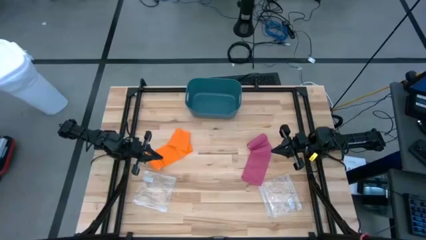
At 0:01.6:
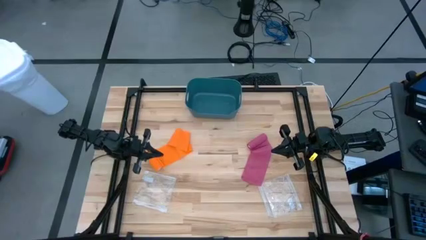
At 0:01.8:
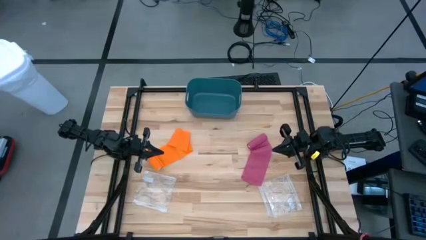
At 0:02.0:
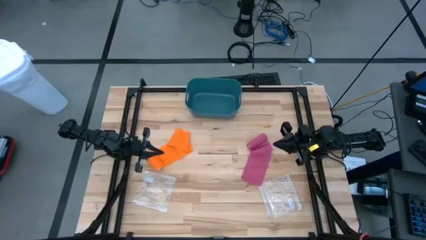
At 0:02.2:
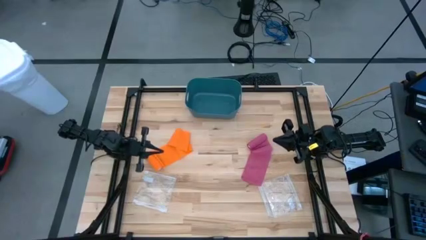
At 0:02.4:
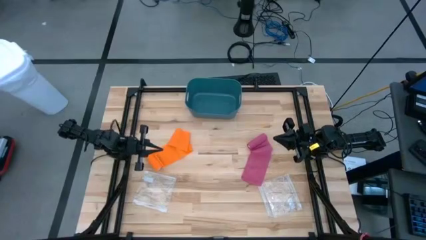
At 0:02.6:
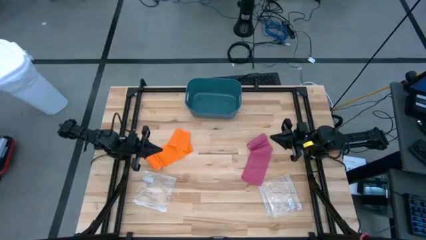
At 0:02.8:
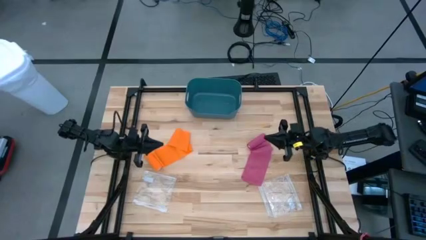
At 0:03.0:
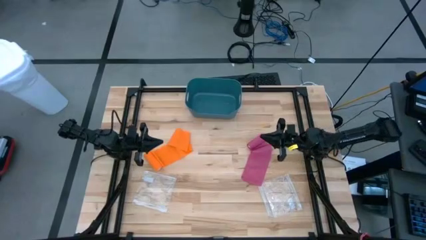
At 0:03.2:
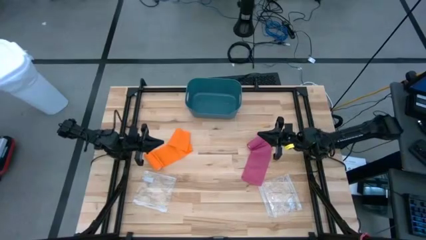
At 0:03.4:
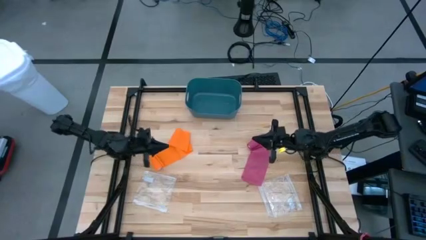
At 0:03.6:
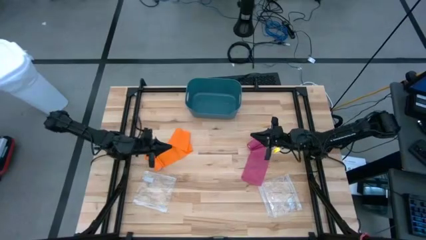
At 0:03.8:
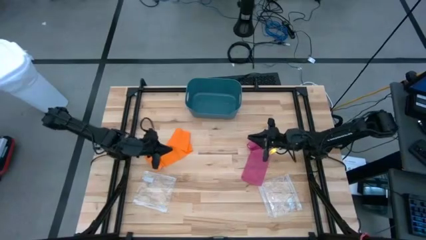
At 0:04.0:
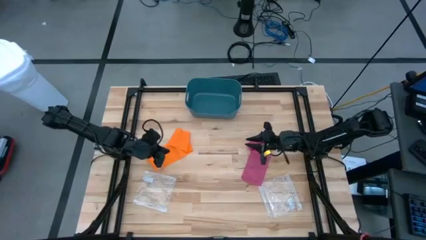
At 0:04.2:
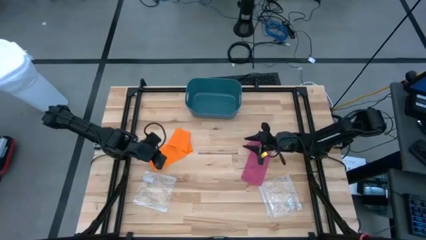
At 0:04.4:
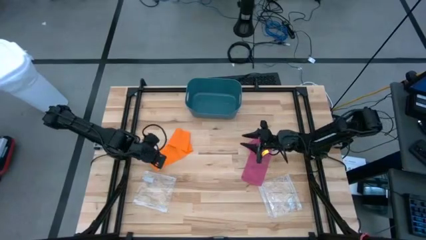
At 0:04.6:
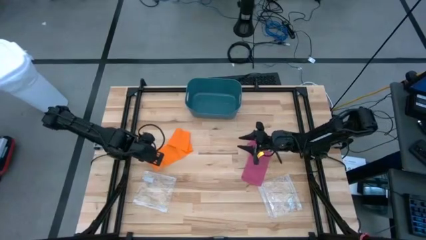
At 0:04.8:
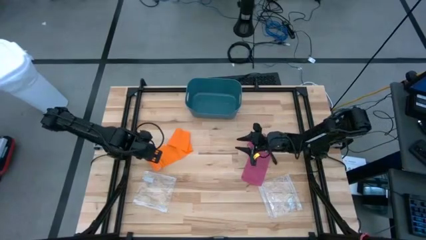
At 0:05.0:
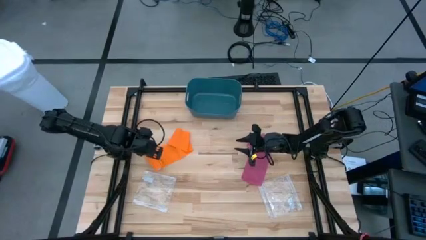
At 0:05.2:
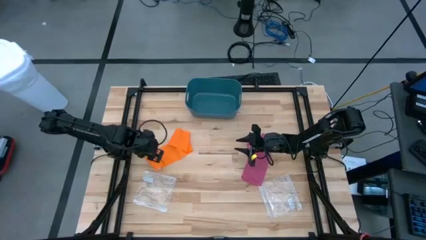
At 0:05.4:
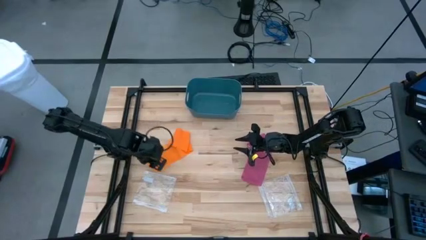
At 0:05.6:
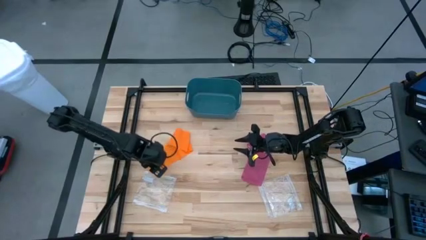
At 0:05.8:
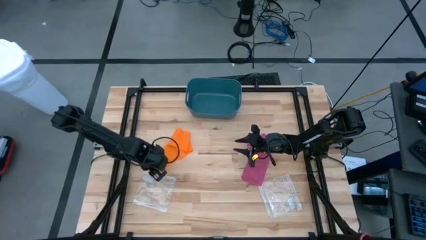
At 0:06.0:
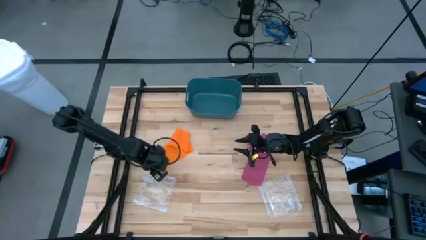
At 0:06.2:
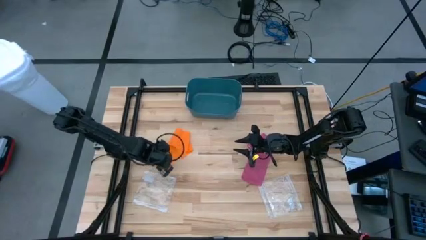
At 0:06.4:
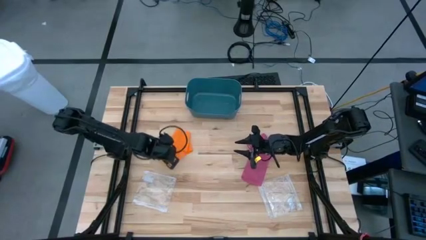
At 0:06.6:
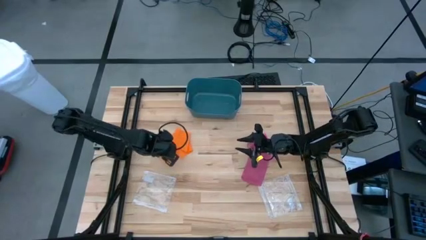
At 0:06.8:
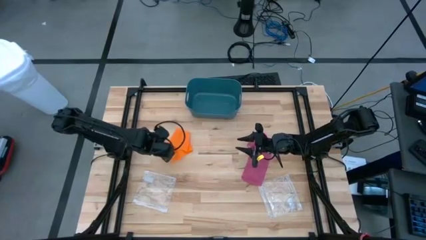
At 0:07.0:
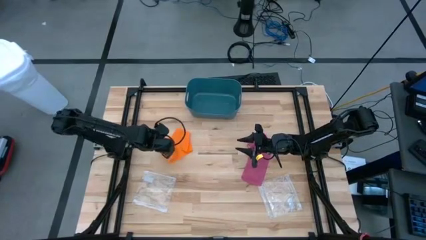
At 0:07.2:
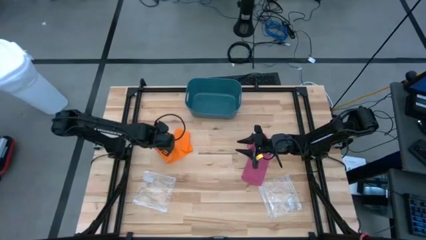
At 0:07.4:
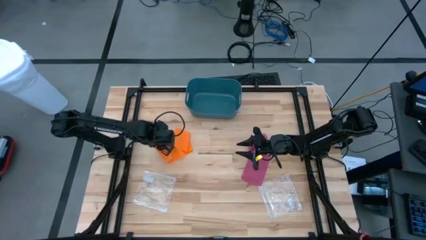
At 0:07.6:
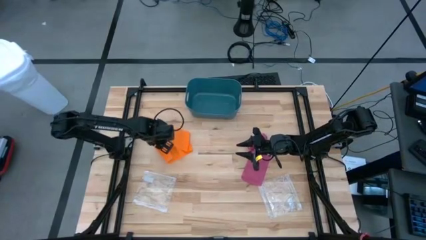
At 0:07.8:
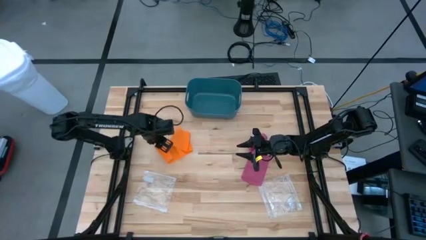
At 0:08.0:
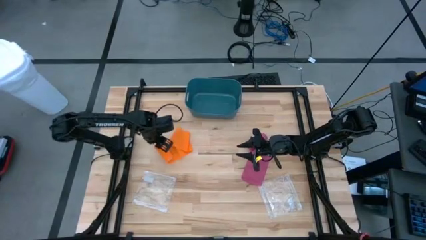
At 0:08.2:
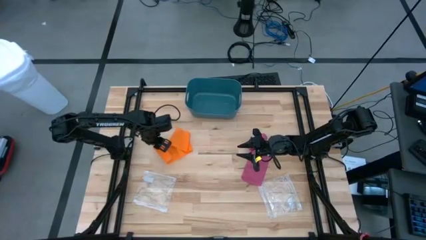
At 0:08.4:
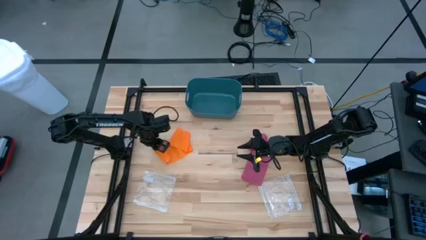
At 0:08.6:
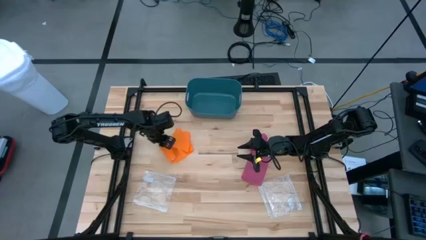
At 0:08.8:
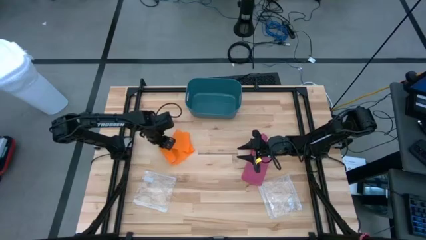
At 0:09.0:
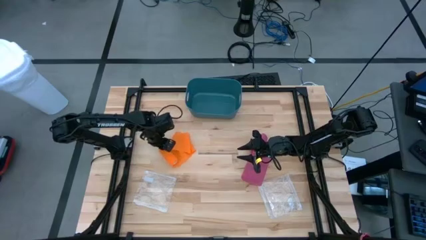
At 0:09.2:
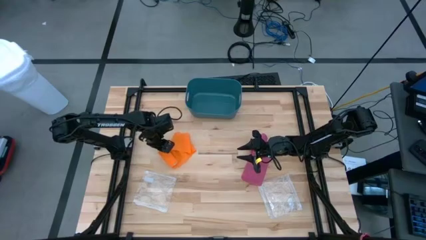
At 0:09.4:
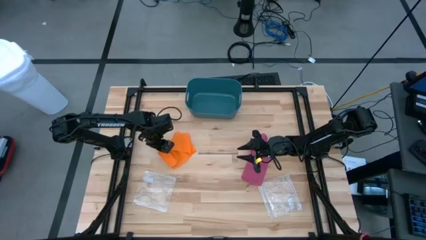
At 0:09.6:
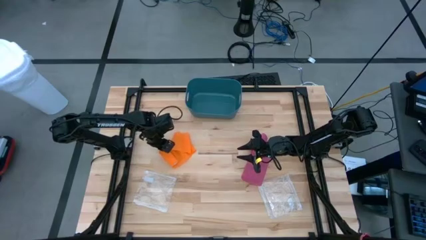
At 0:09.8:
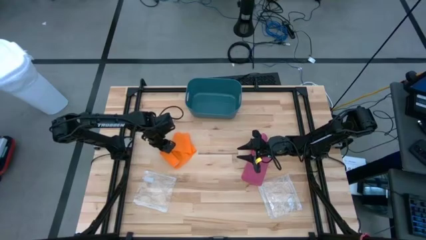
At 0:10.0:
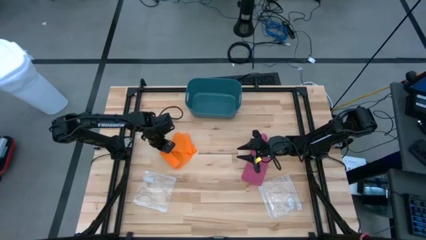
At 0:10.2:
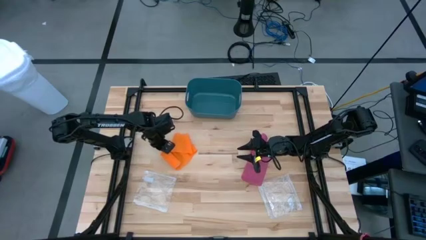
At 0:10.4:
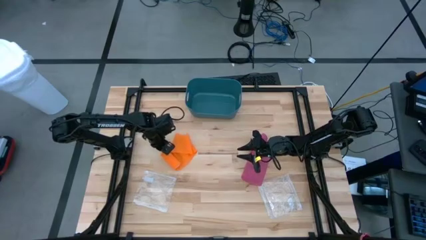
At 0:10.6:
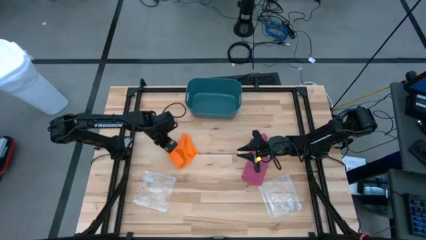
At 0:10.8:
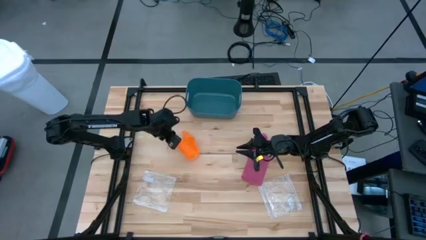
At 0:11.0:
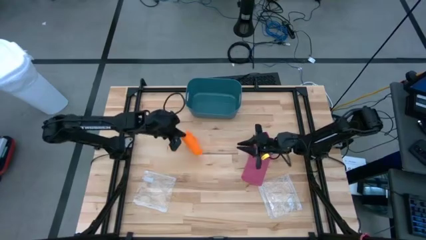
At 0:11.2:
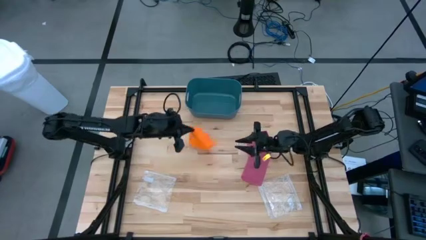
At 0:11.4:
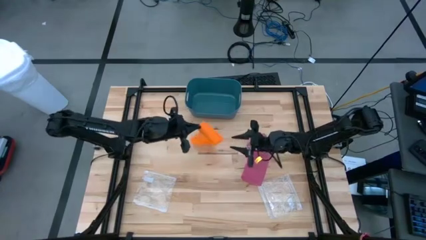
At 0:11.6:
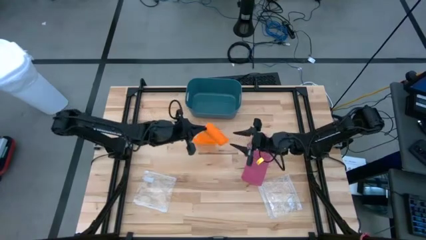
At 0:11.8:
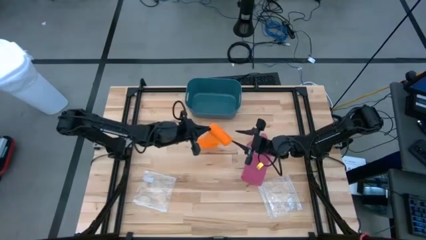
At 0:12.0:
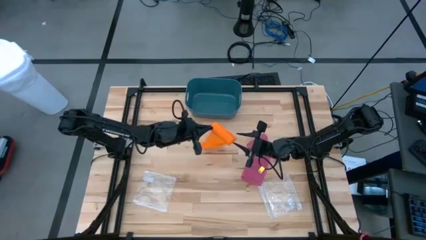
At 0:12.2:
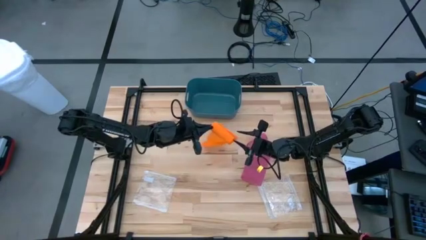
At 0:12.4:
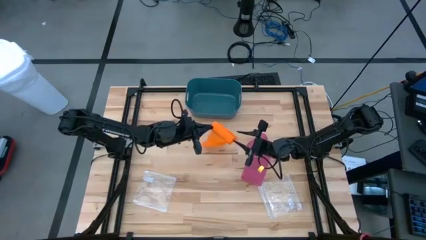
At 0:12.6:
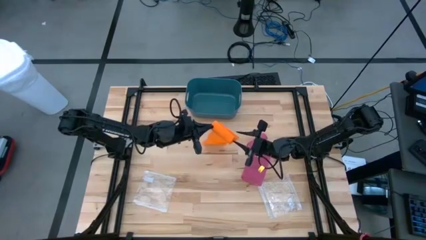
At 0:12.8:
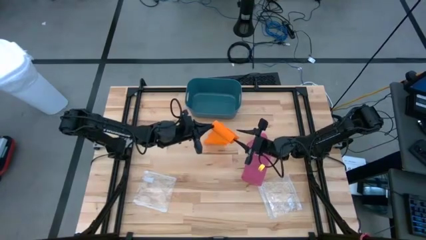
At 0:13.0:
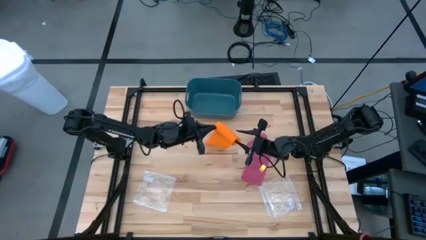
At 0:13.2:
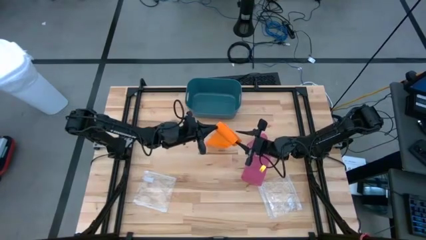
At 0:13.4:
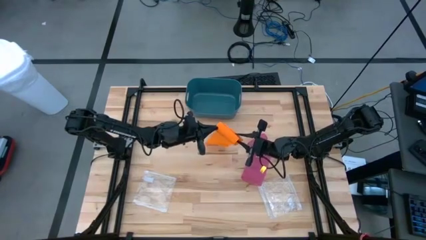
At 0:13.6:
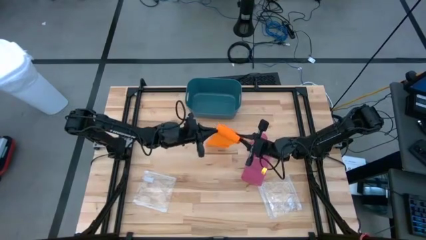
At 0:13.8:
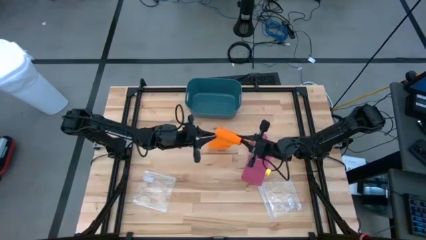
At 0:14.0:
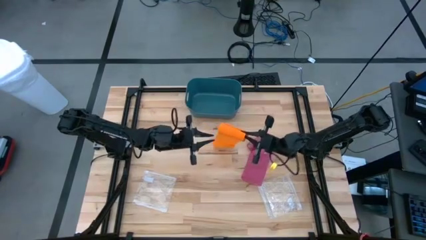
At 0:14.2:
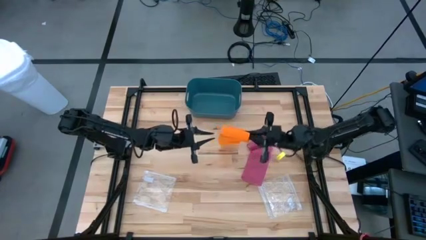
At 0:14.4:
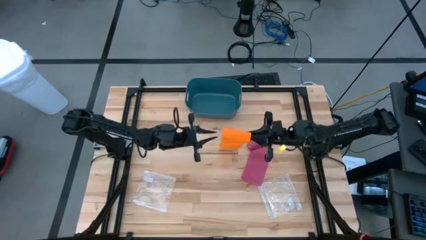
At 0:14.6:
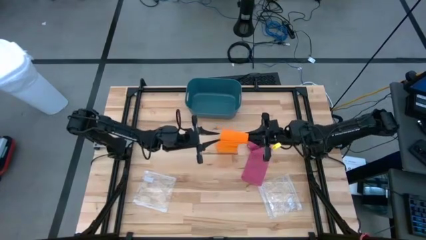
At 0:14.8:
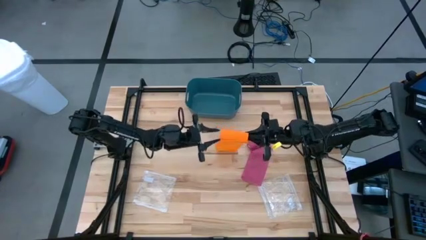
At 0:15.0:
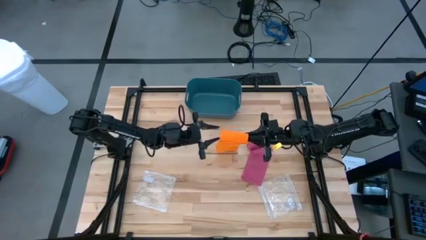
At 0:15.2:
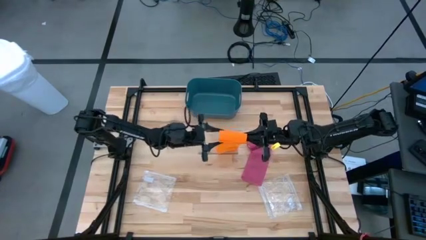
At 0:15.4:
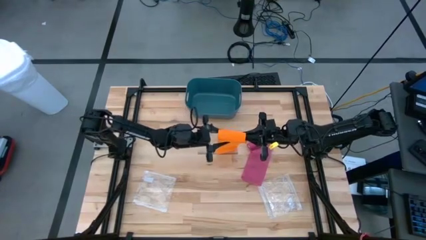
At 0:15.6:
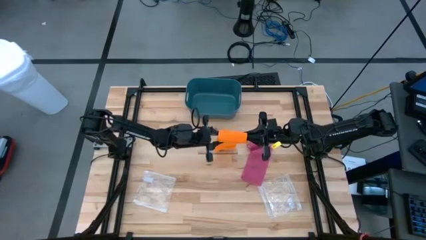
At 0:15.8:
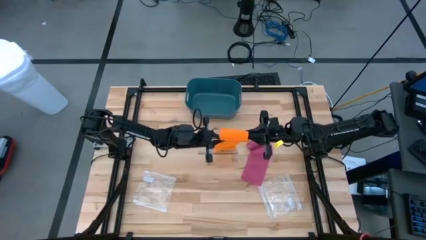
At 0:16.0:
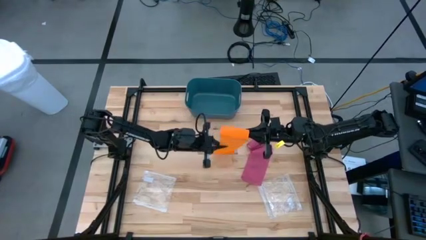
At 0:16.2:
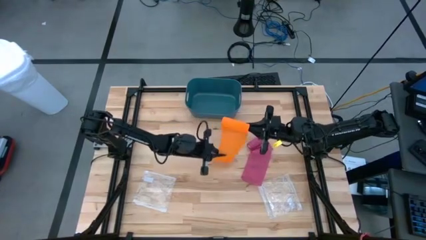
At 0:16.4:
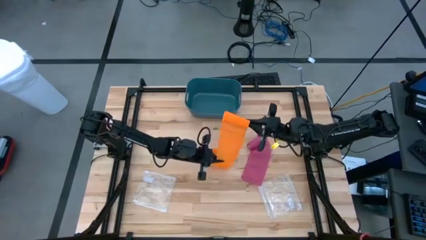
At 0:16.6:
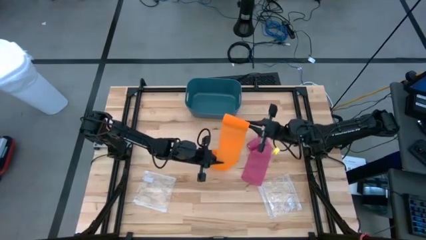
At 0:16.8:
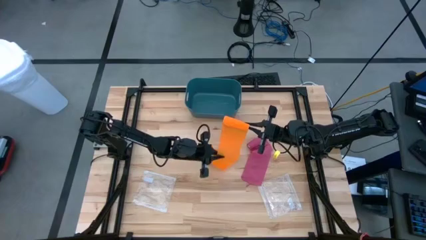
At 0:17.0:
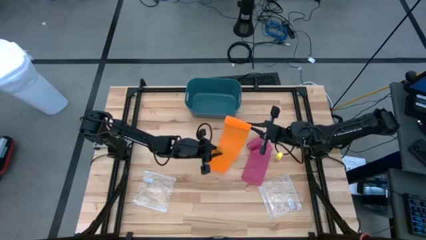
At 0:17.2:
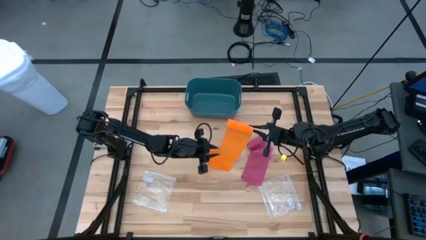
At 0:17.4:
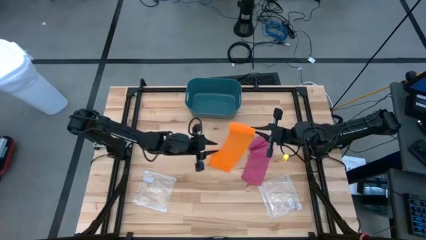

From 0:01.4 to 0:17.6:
Task: Roll bandage
Roll the orange bandage
